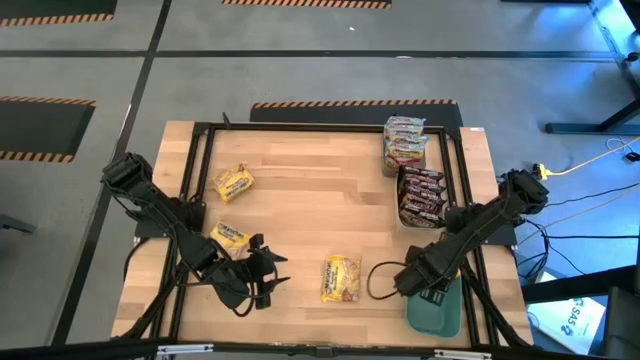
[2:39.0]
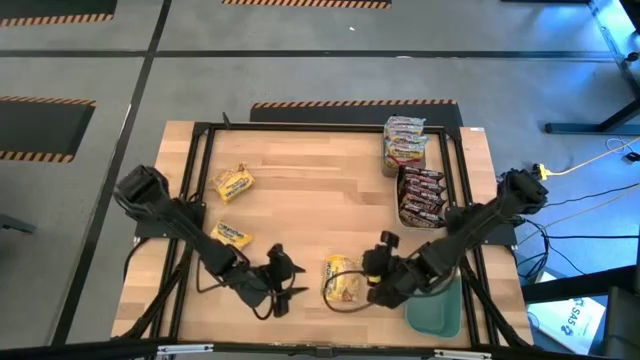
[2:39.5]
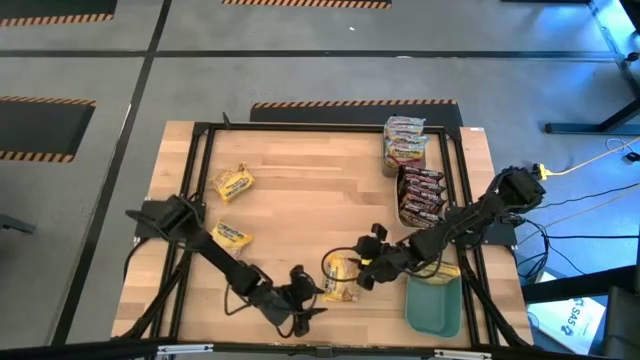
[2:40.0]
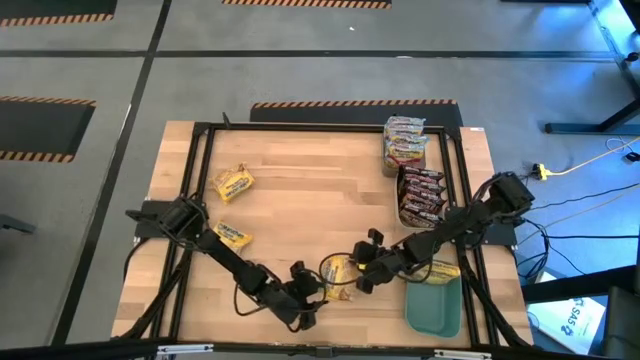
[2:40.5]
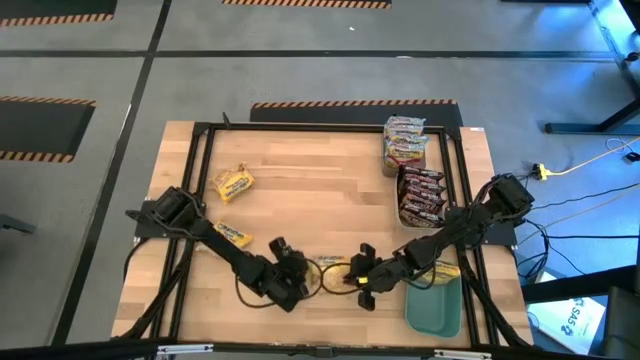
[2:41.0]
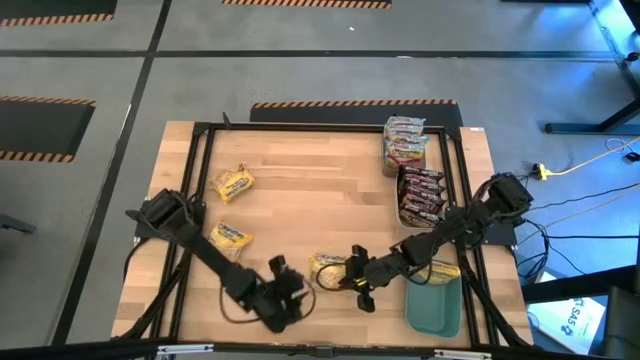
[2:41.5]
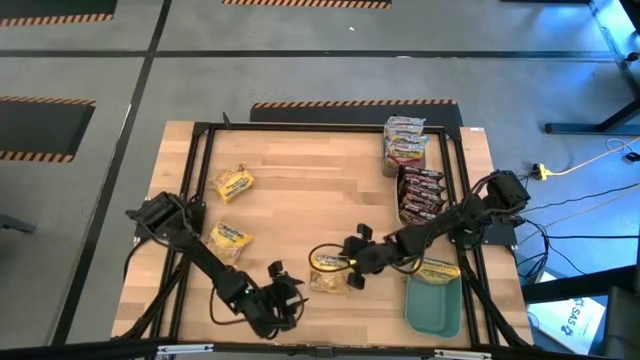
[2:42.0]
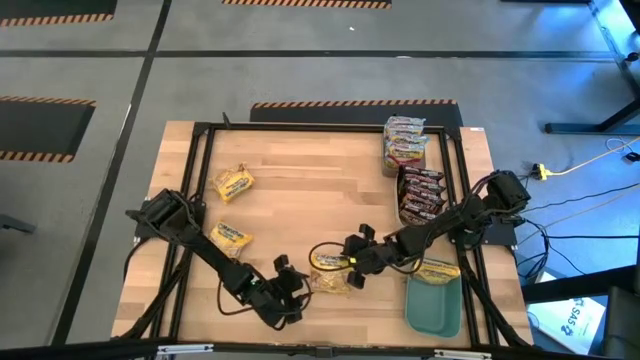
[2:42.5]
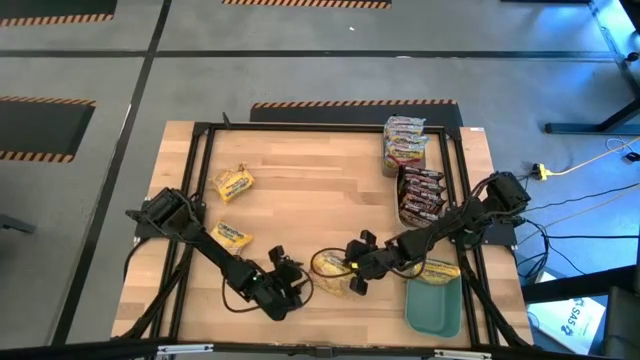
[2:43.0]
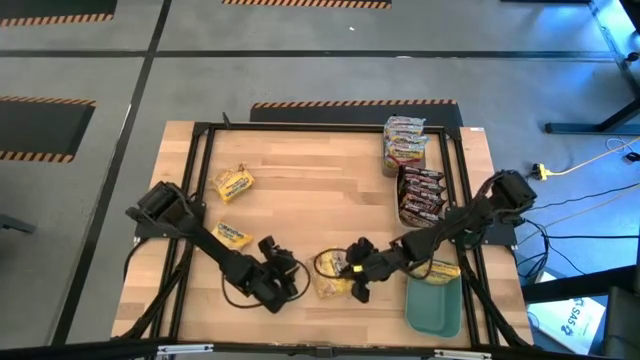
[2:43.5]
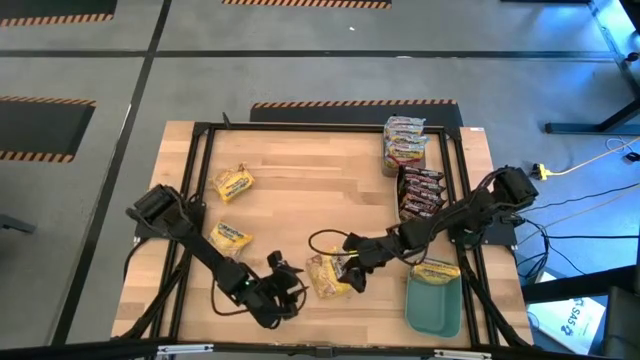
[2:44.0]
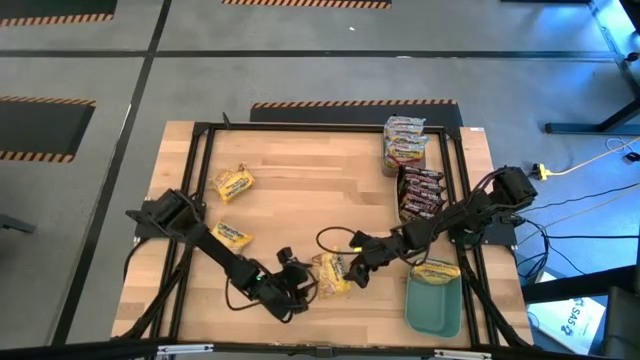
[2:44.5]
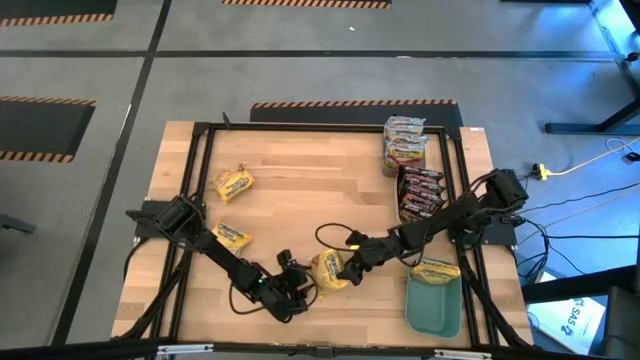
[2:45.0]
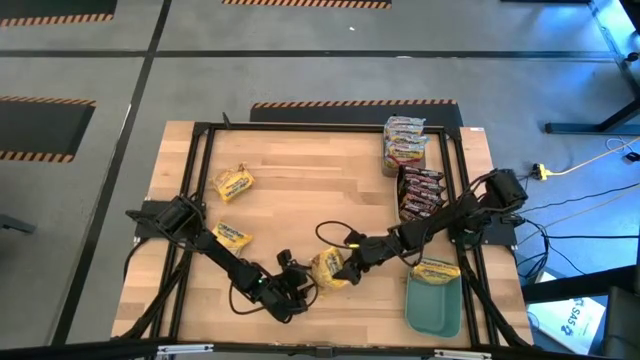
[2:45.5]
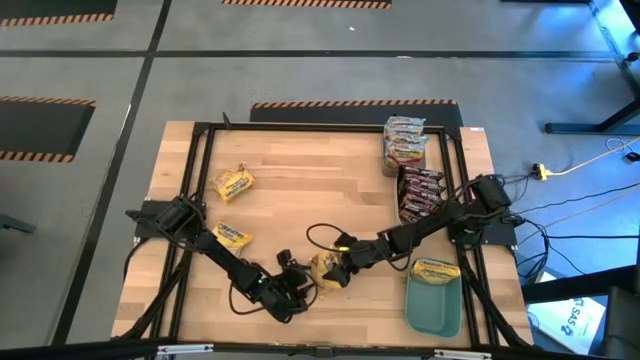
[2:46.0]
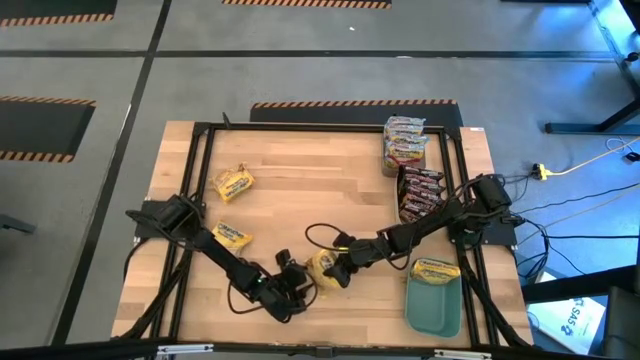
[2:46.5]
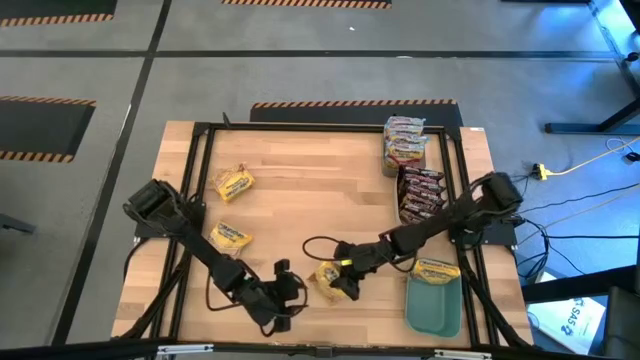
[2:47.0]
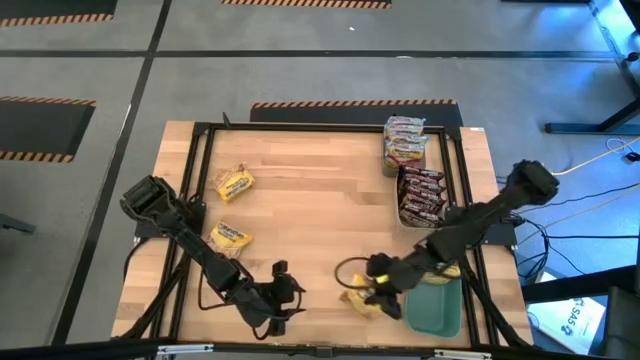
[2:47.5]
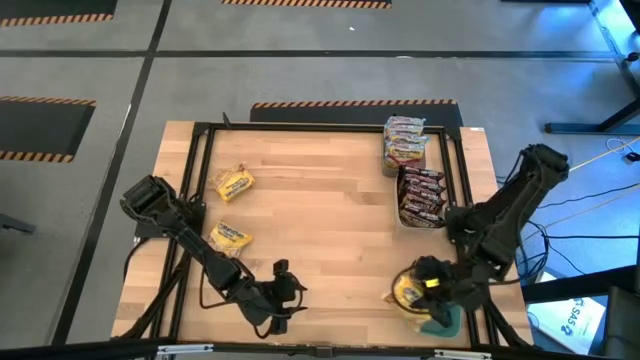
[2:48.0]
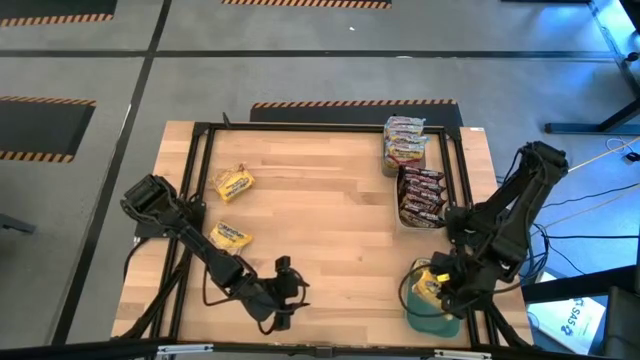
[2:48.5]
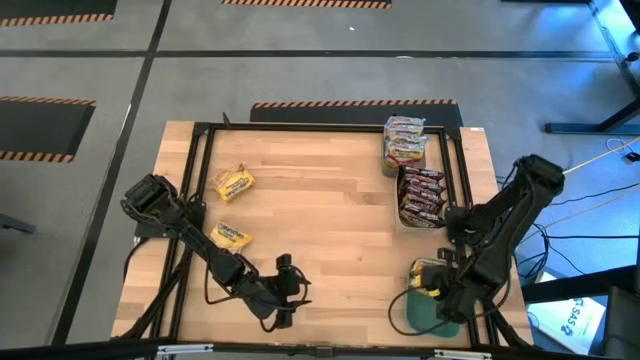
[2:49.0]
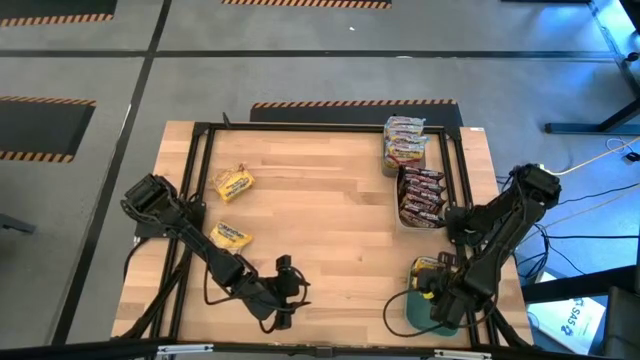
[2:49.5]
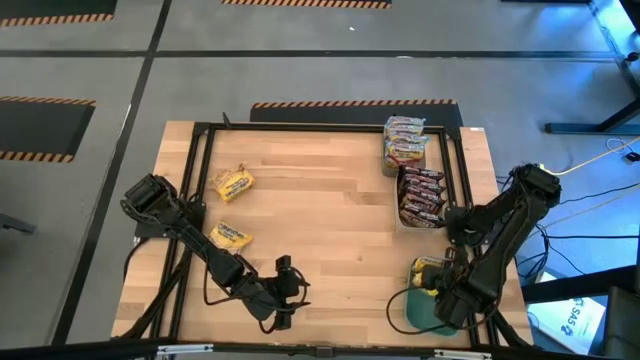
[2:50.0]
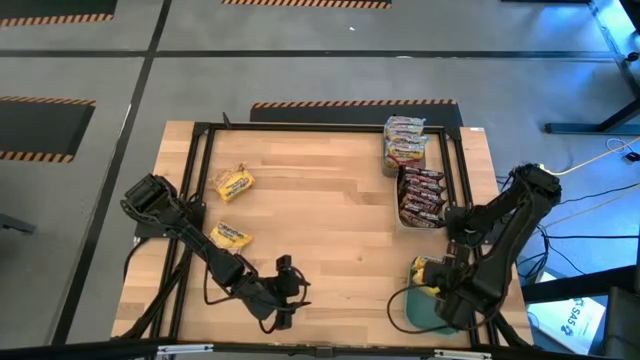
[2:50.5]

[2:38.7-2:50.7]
Task: Sort Maruchan noodles
Put the yellow noodle pack into the green bin

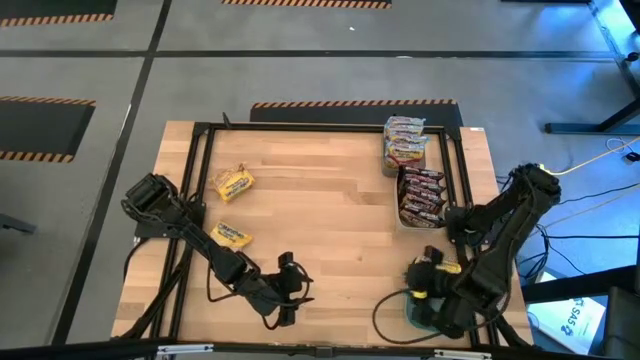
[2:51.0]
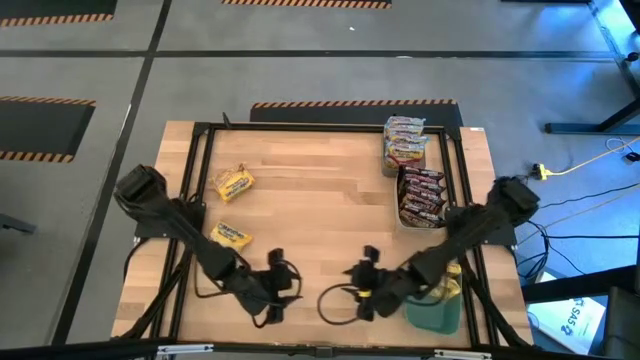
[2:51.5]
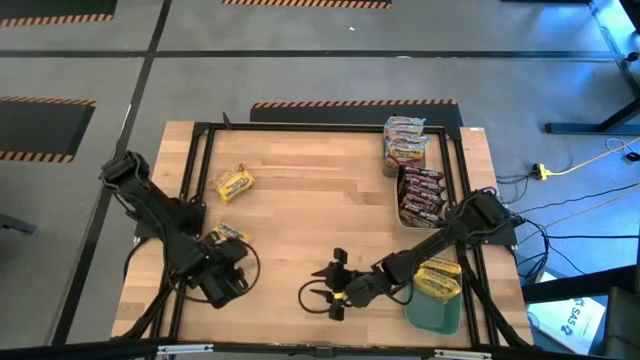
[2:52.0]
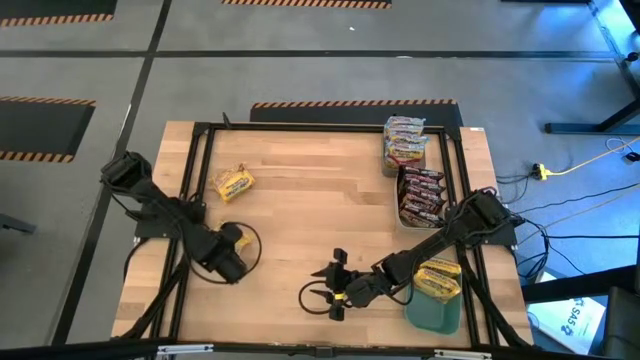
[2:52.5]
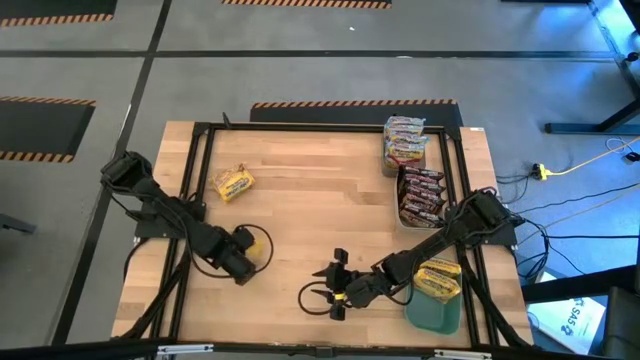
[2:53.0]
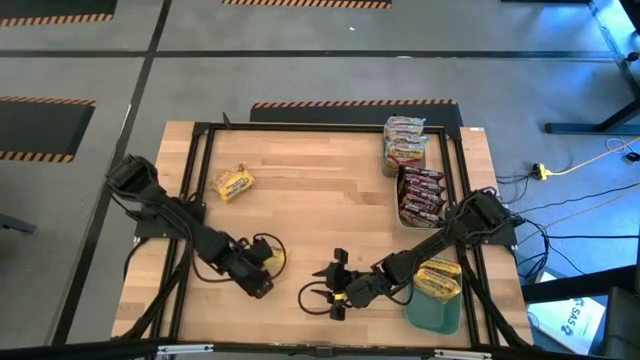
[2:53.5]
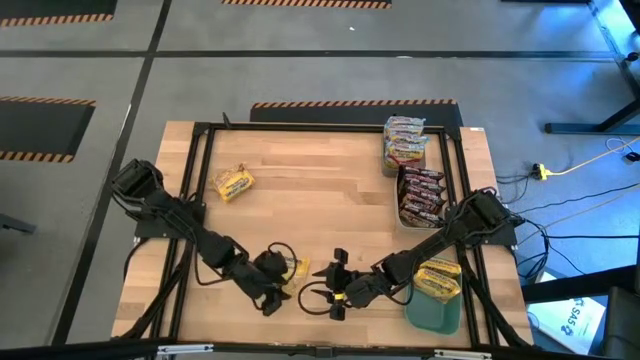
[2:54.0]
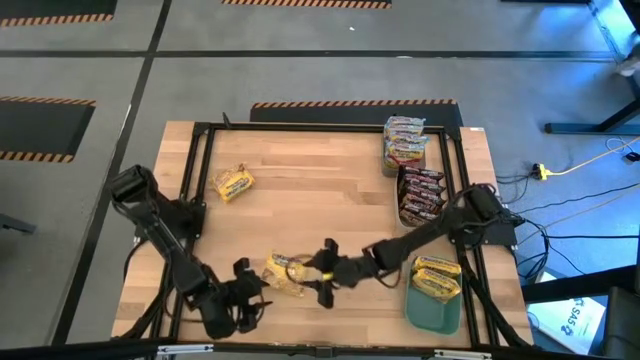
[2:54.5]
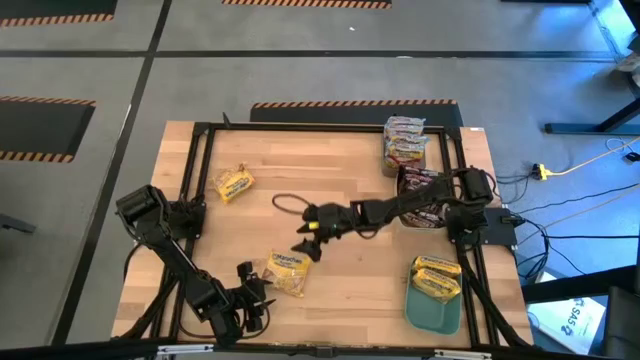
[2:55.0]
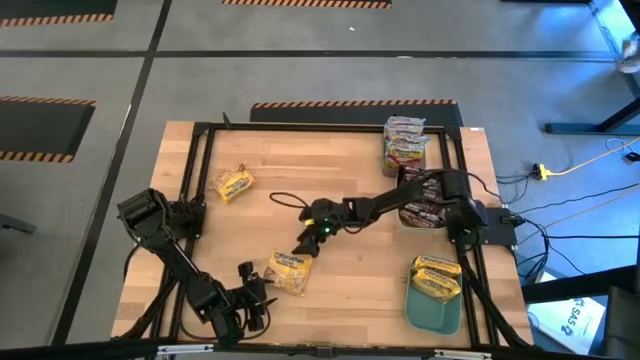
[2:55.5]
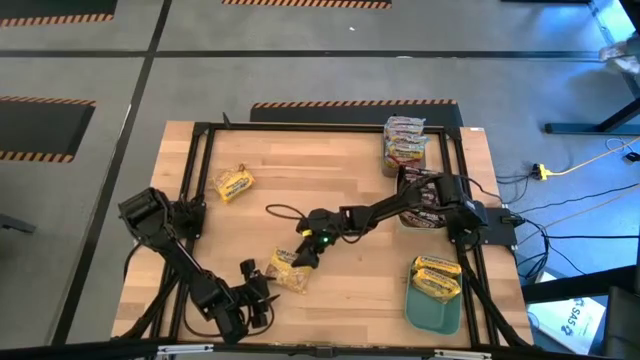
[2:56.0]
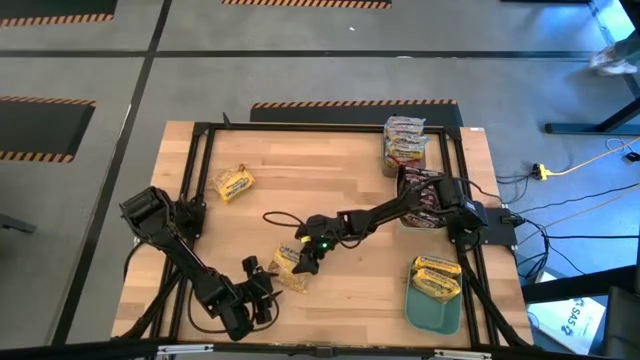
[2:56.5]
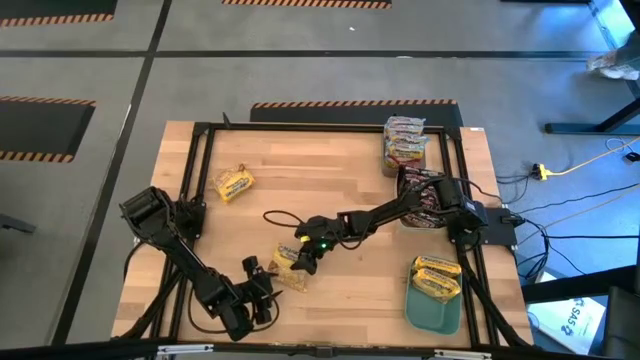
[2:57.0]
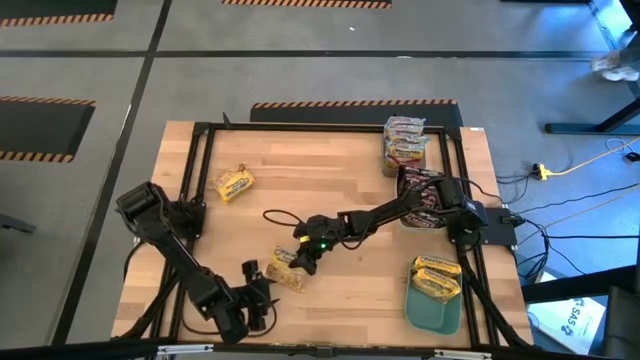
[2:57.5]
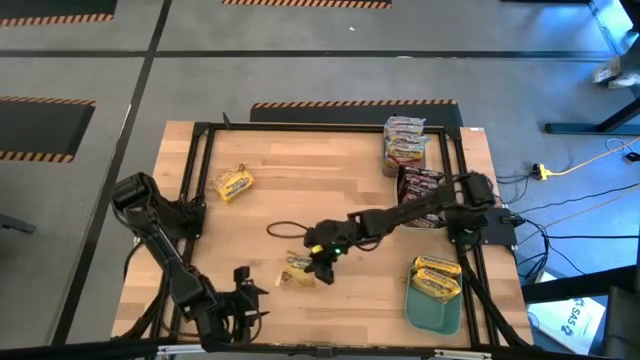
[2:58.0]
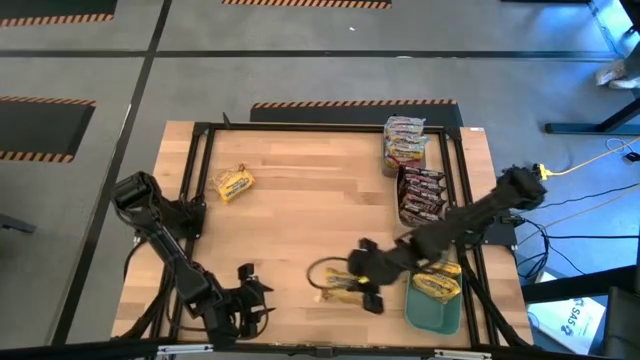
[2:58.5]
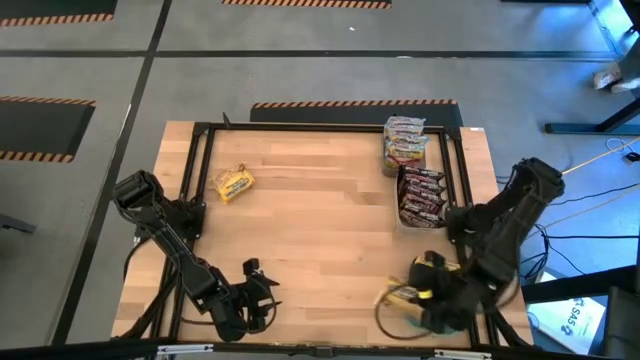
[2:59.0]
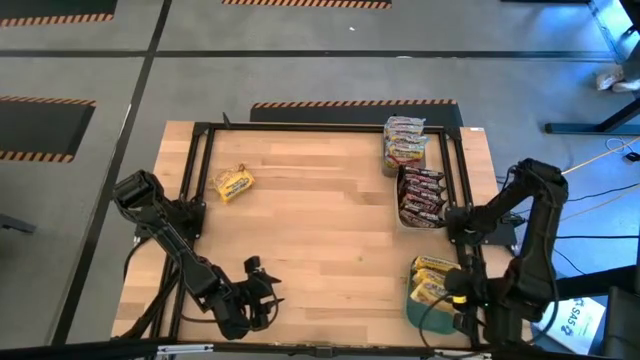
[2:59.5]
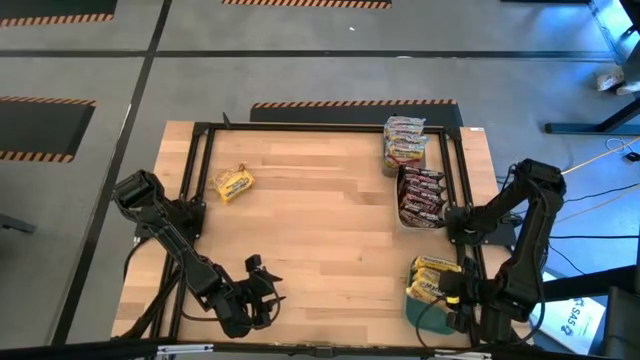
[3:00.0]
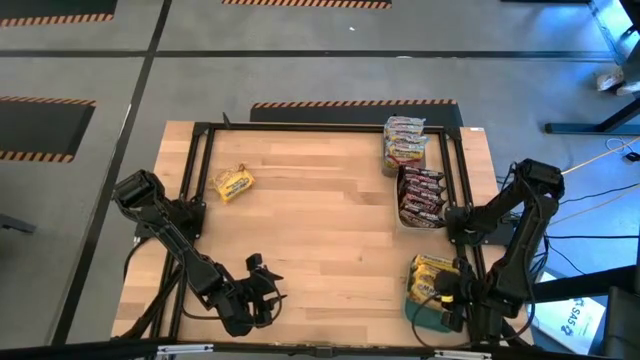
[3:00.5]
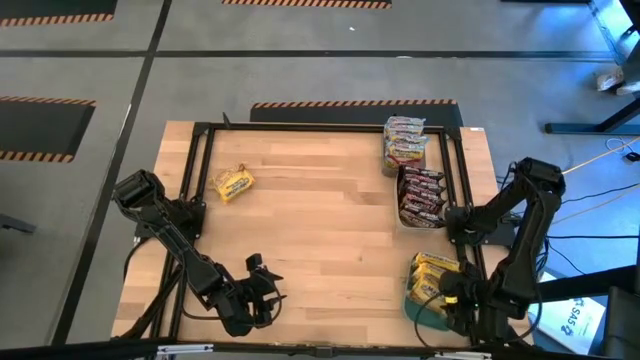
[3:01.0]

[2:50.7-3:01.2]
Put the yellow noodle pack into the green bin

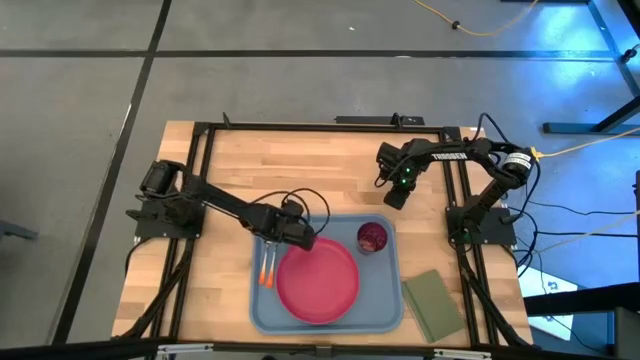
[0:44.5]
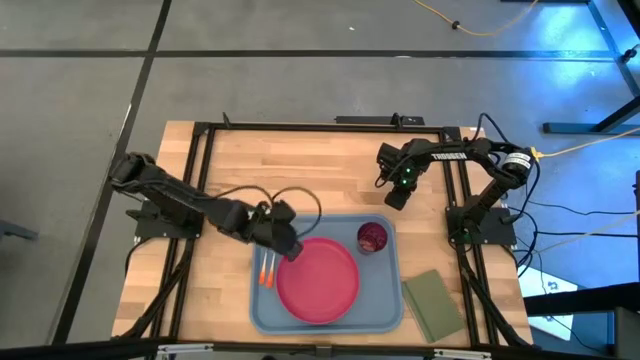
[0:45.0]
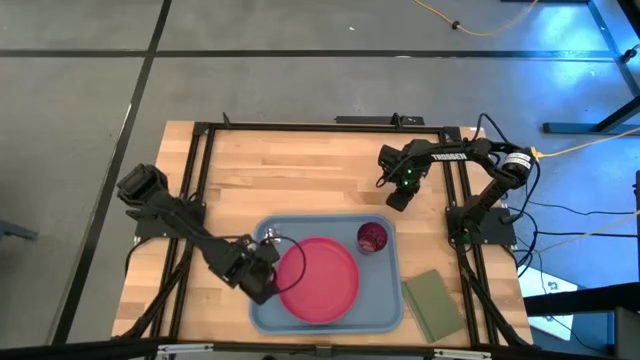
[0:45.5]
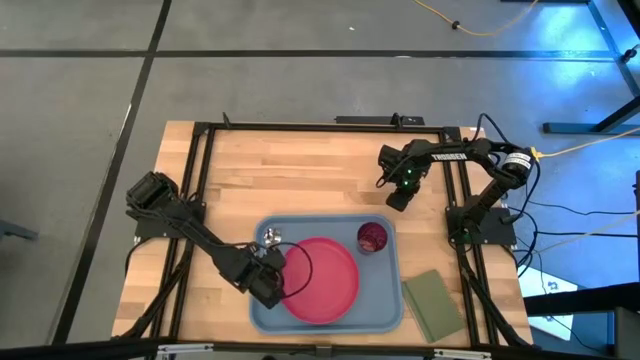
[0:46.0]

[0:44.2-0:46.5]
Task: Pick and place plate/cup/fork/spoon on tray
Adjust the pink plate in the blue tray
